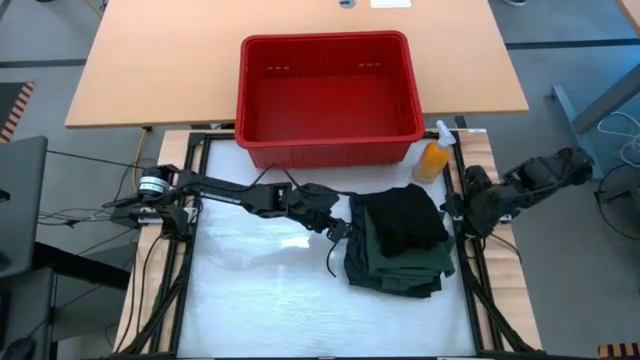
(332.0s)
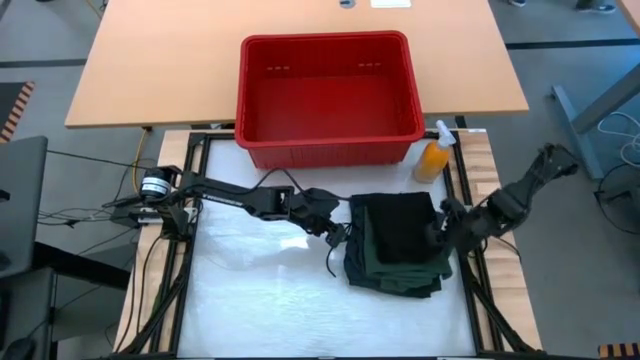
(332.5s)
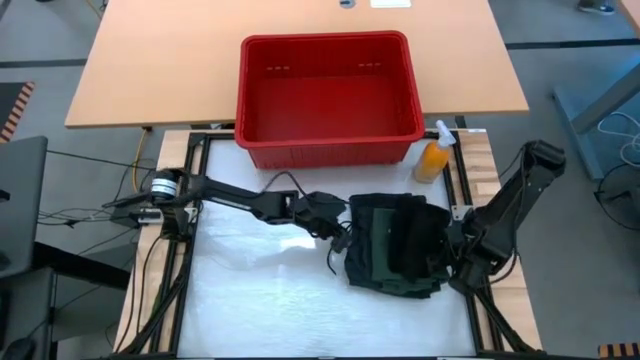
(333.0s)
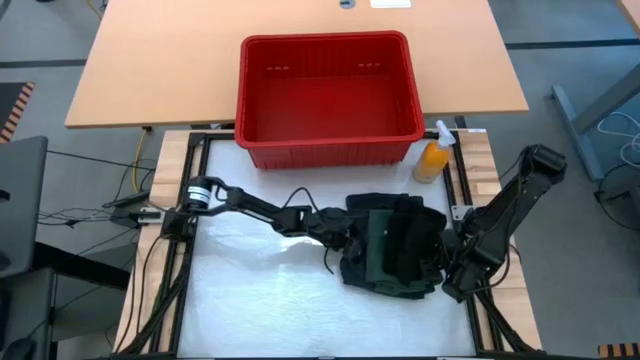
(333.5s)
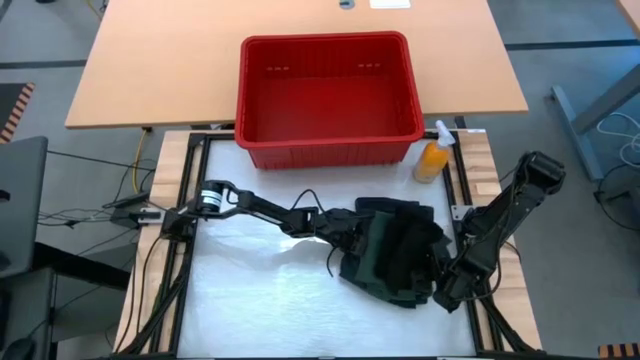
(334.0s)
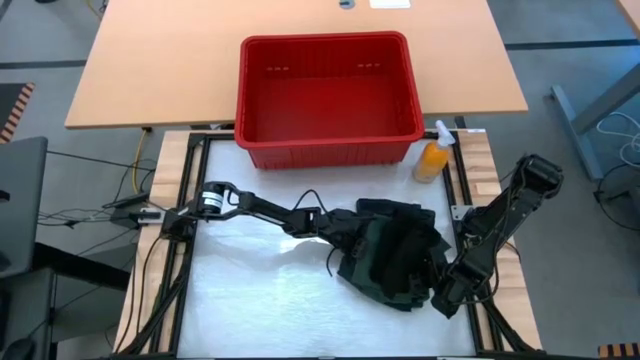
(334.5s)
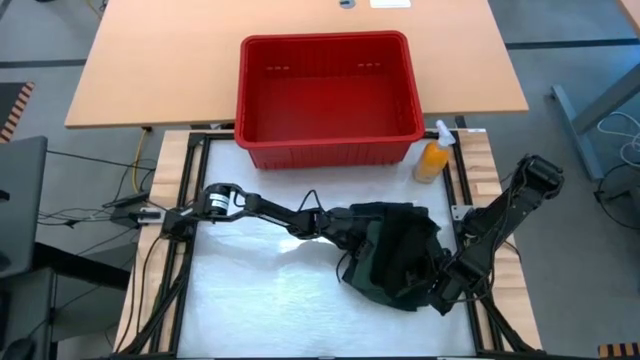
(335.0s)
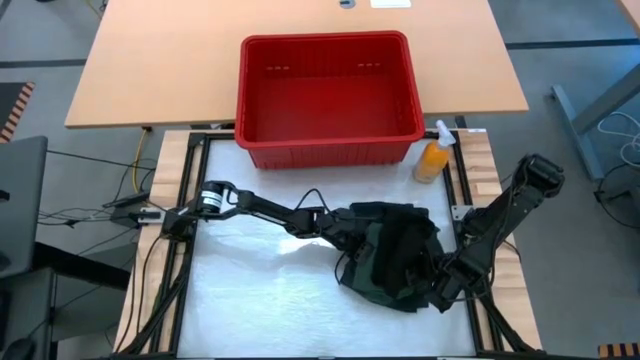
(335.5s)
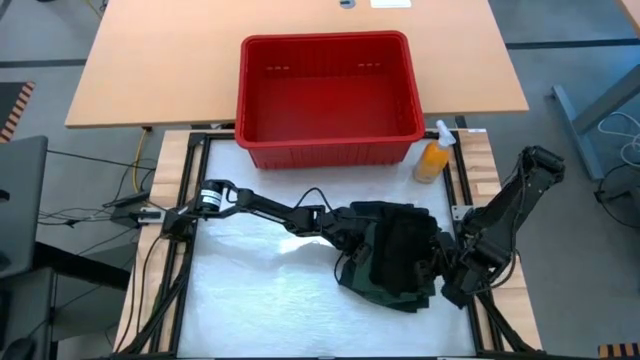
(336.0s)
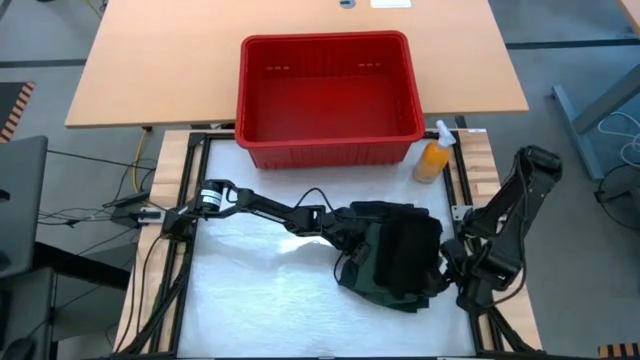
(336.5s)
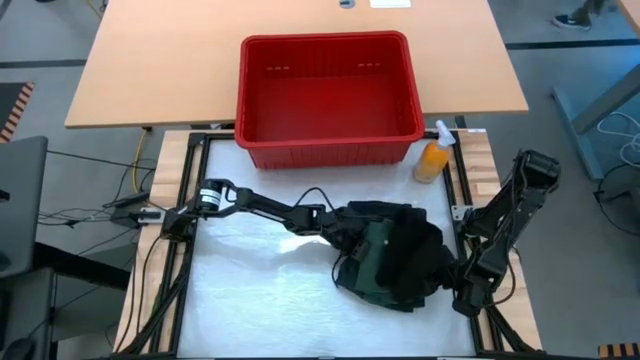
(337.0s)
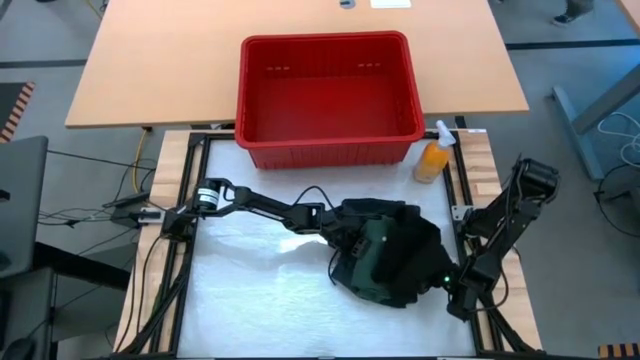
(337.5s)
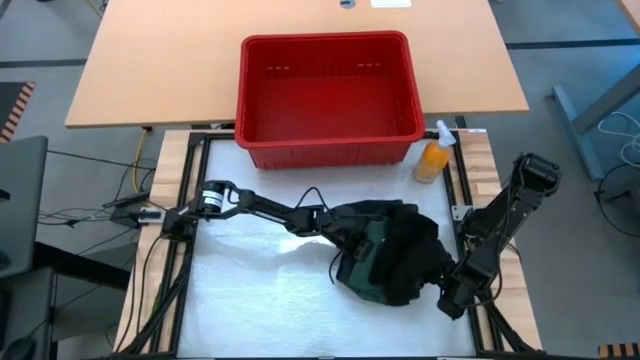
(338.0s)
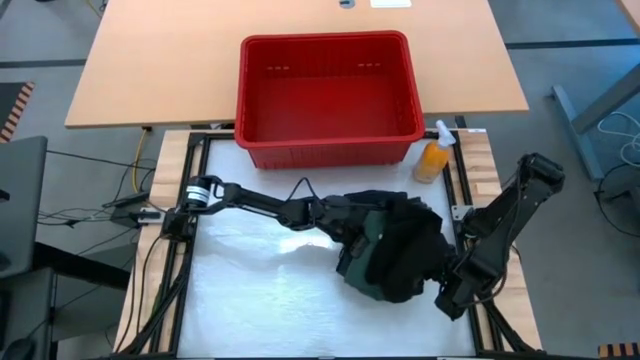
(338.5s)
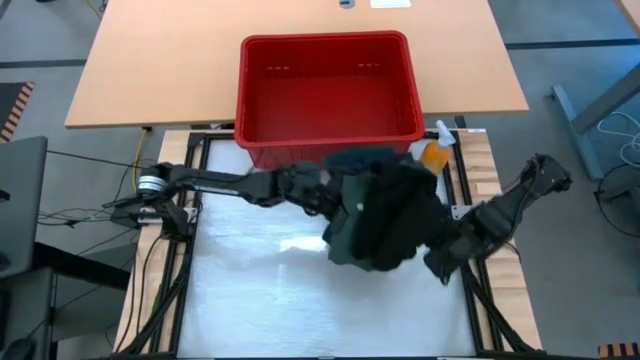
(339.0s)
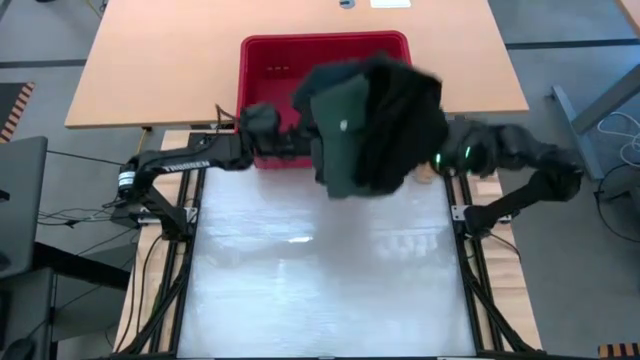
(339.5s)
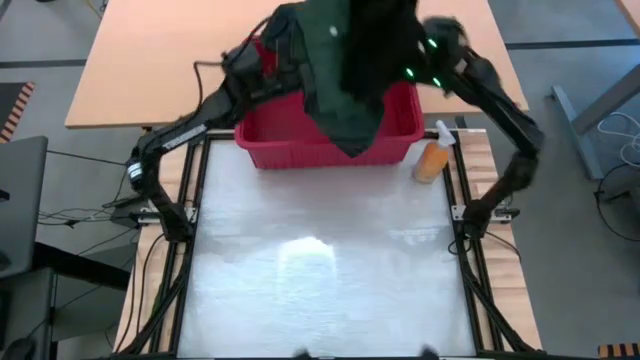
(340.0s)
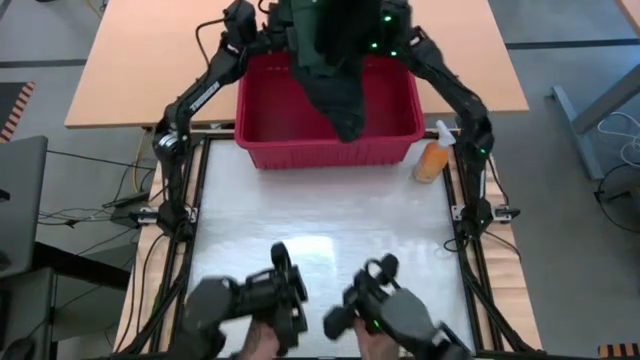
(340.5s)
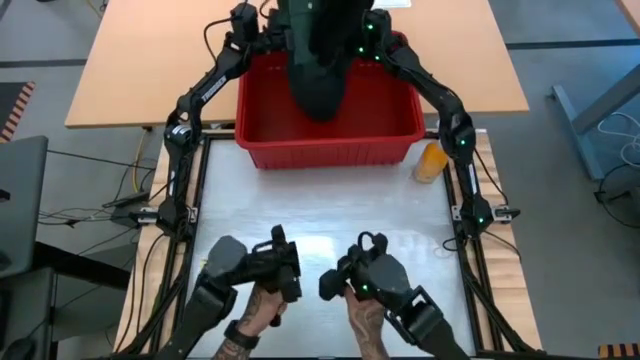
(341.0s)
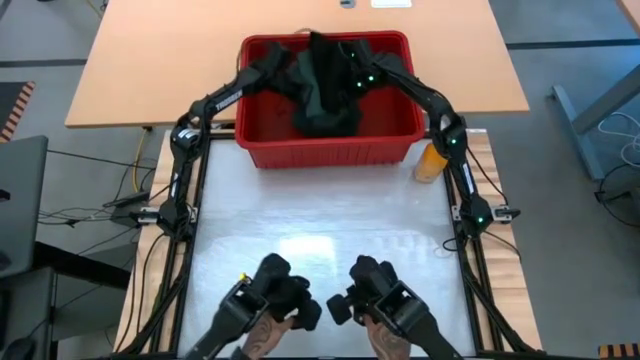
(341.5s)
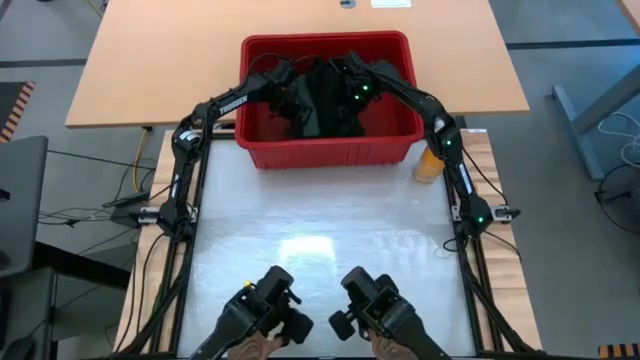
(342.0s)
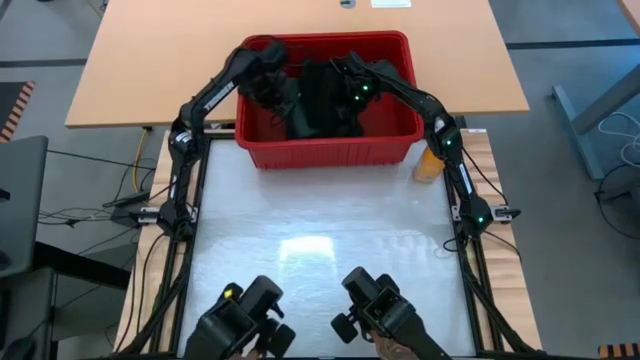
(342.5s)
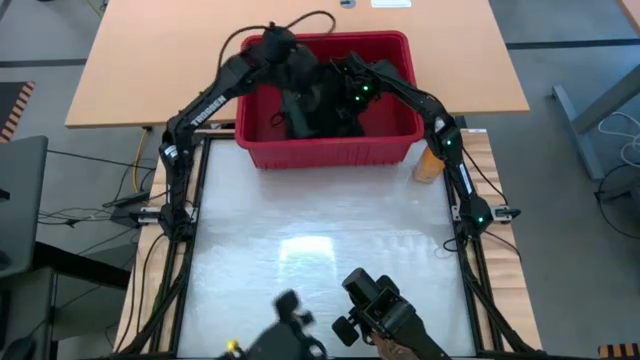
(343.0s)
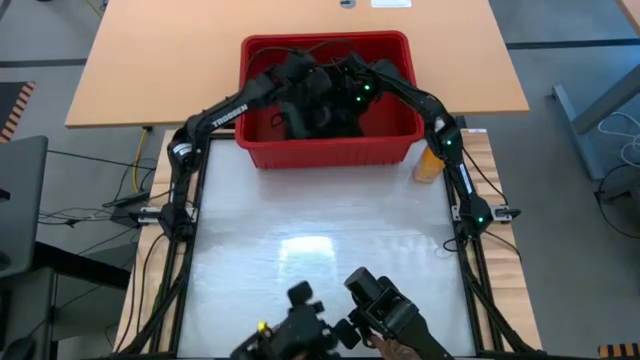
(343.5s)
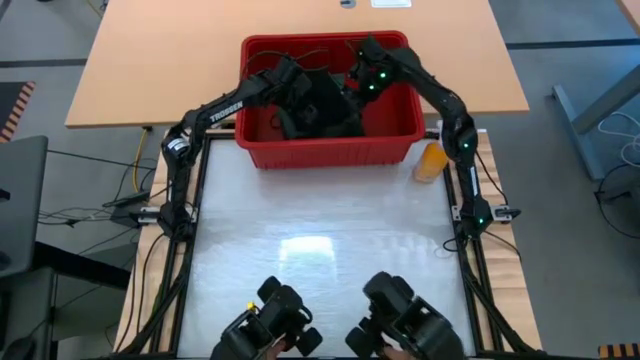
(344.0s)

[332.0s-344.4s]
Task: Fold laundry
Put the stacked clothes into the bin

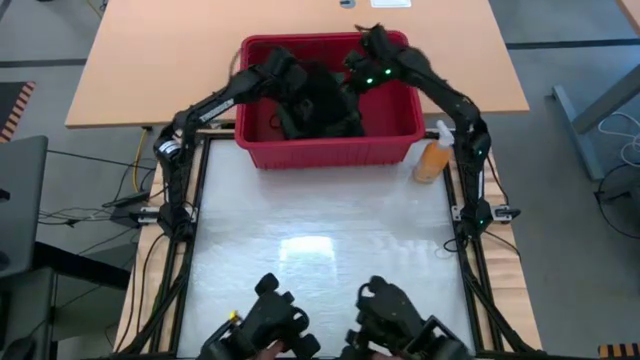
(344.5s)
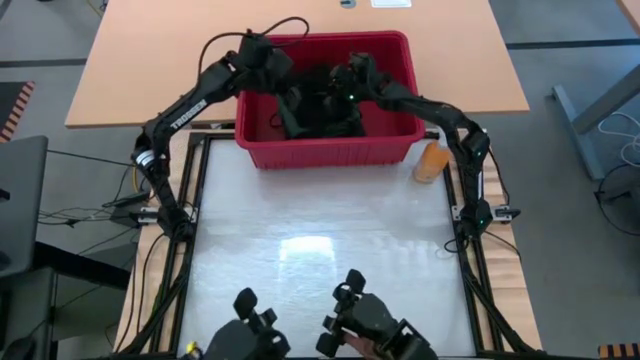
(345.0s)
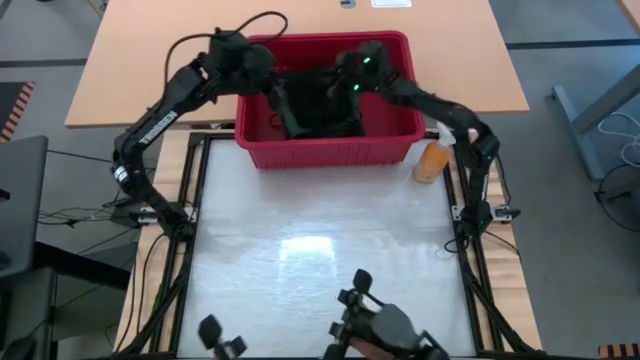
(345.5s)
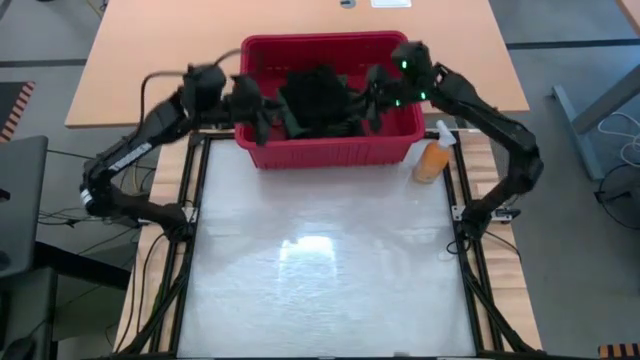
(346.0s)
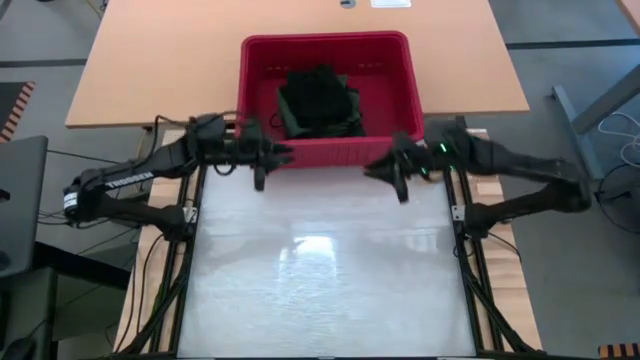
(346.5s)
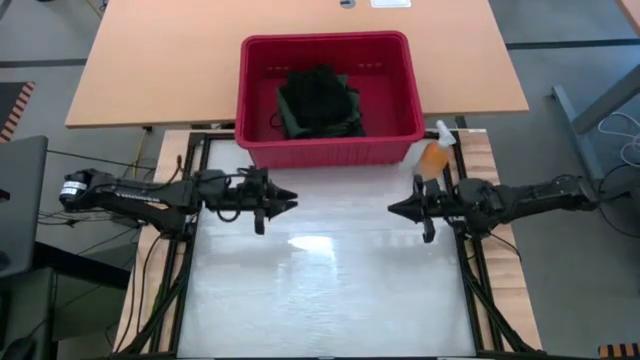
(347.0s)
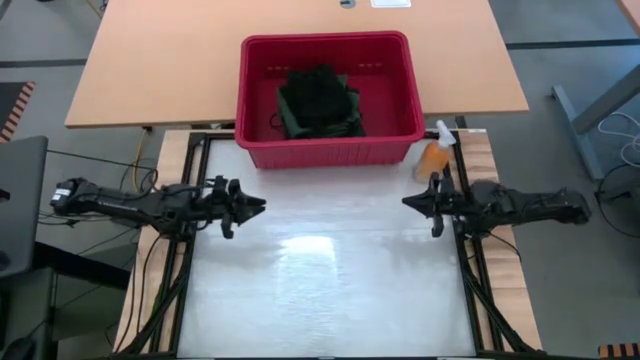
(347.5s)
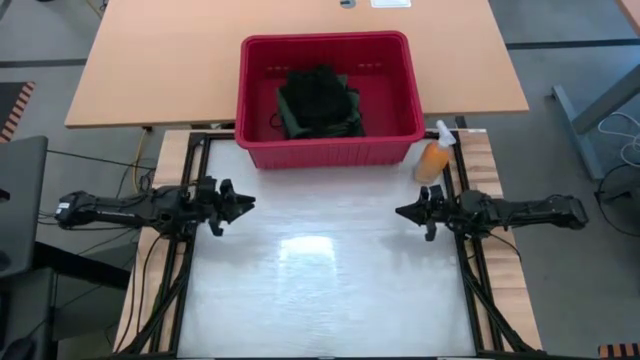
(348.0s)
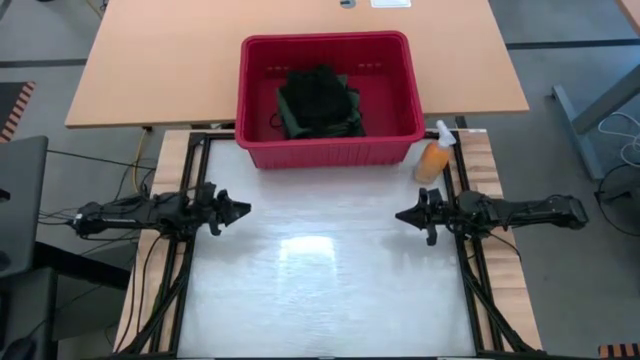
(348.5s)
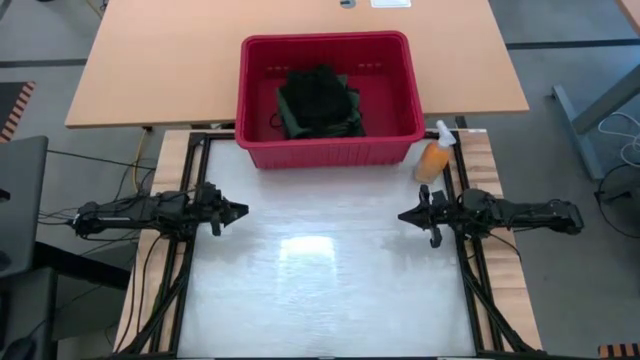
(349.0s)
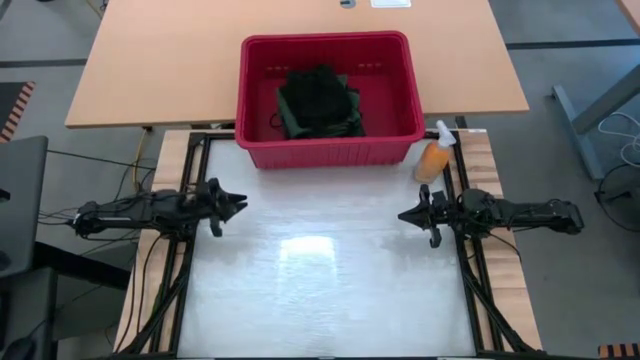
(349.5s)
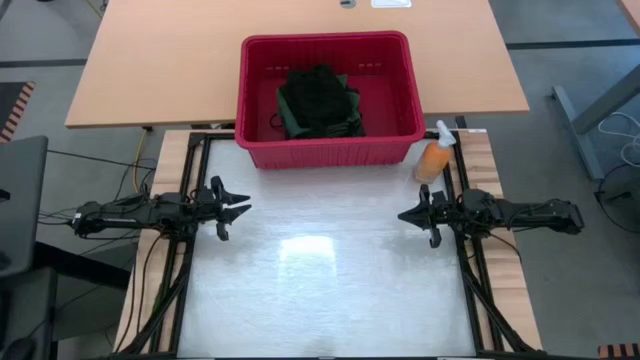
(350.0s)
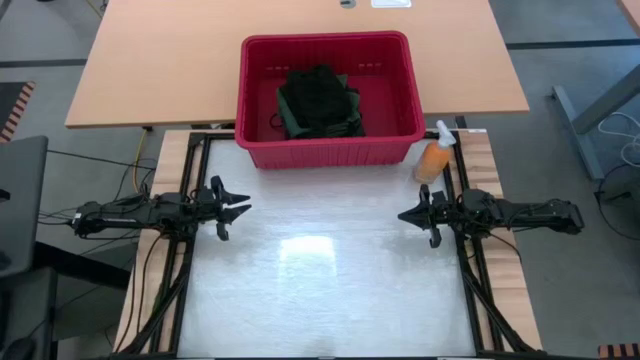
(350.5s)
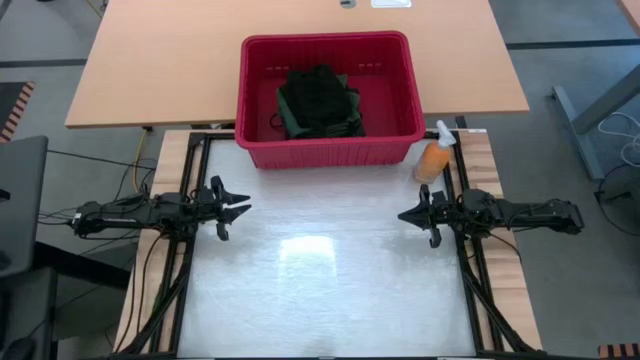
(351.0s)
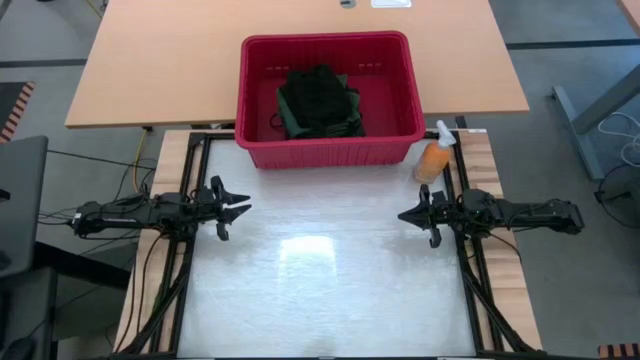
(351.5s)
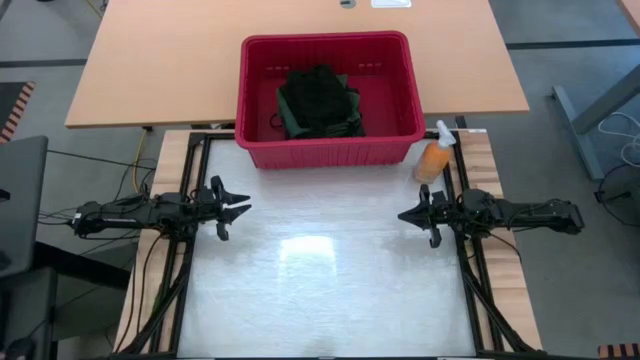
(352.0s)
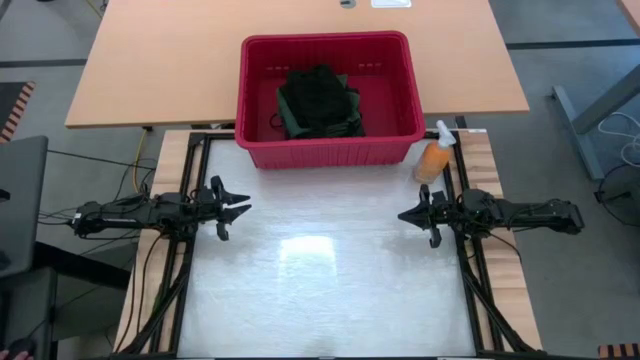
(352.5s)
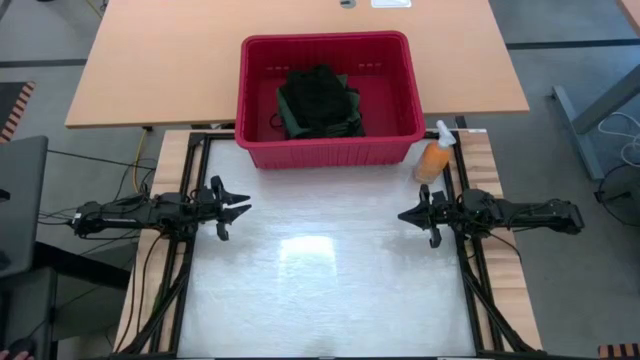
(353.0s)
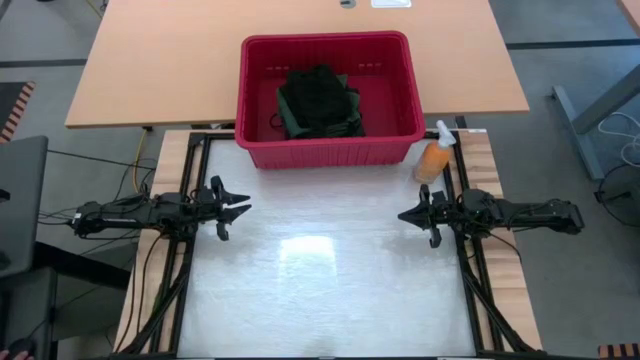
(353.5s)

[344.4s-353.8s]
Return to Home Position
